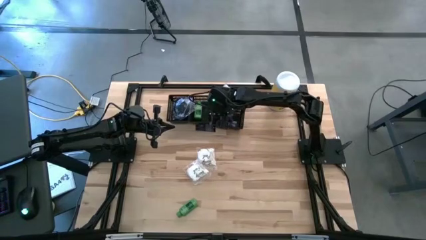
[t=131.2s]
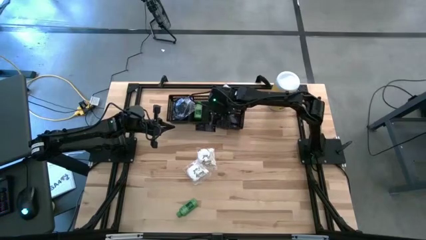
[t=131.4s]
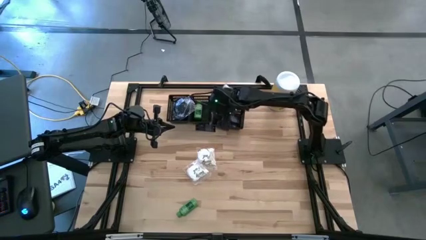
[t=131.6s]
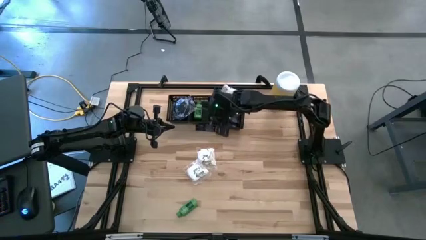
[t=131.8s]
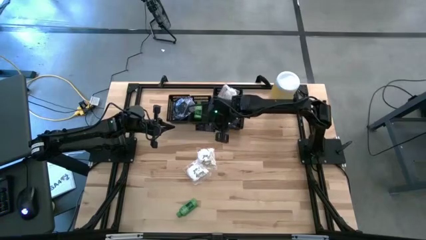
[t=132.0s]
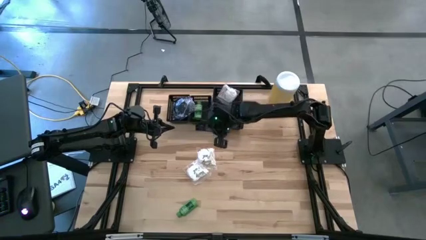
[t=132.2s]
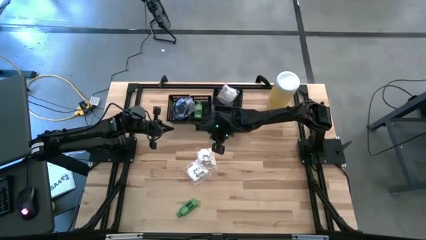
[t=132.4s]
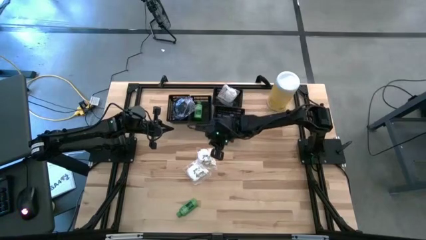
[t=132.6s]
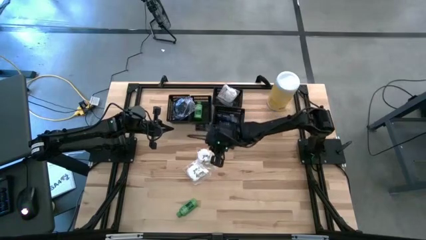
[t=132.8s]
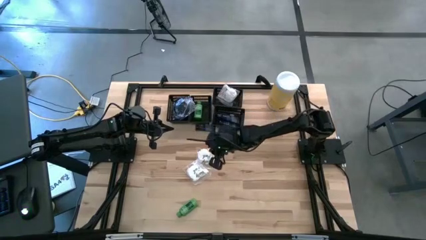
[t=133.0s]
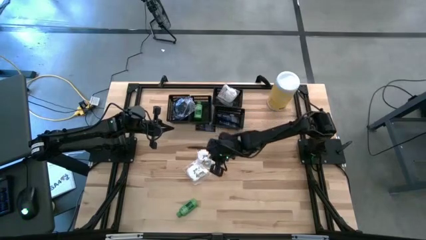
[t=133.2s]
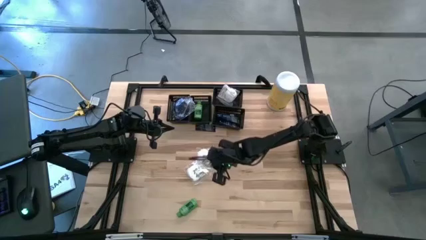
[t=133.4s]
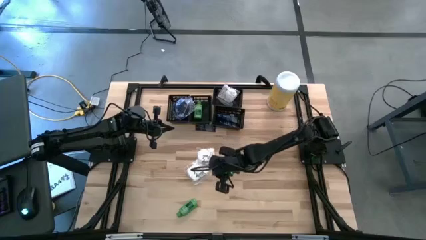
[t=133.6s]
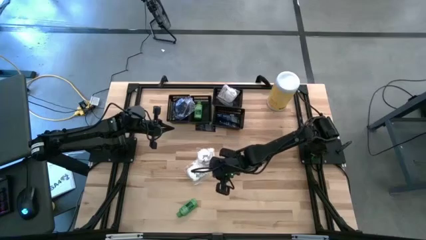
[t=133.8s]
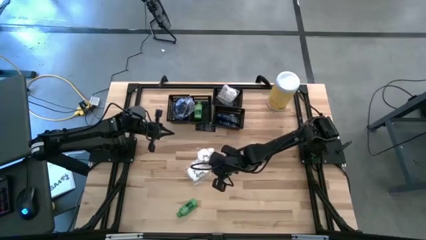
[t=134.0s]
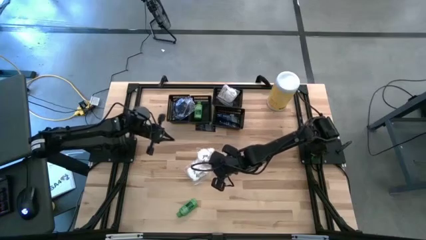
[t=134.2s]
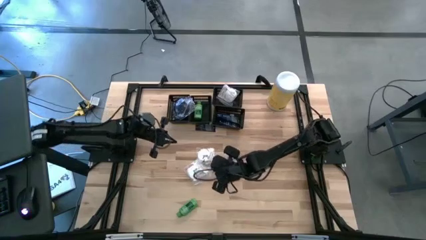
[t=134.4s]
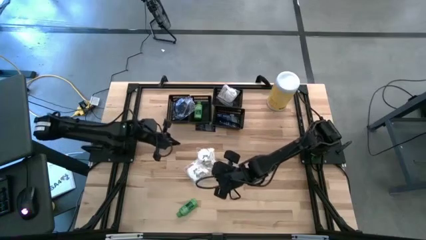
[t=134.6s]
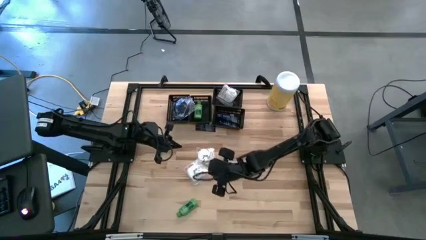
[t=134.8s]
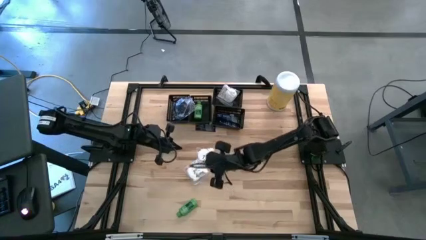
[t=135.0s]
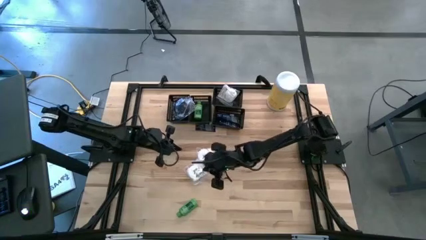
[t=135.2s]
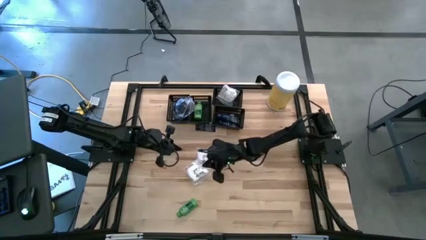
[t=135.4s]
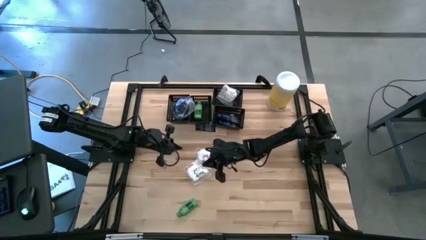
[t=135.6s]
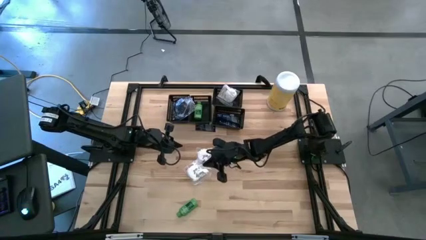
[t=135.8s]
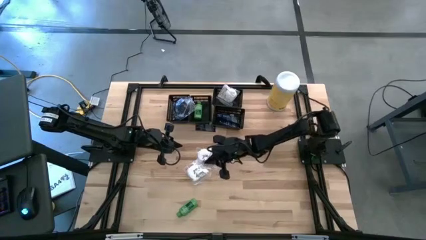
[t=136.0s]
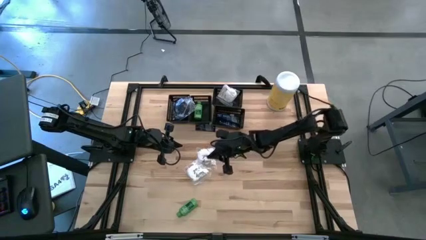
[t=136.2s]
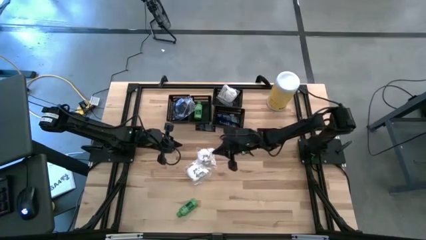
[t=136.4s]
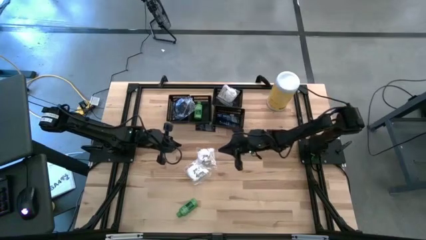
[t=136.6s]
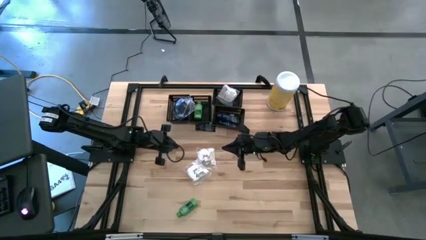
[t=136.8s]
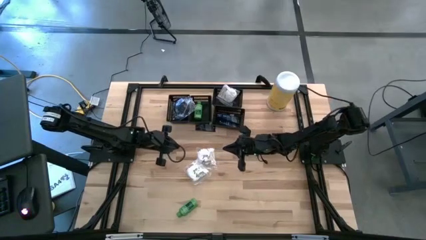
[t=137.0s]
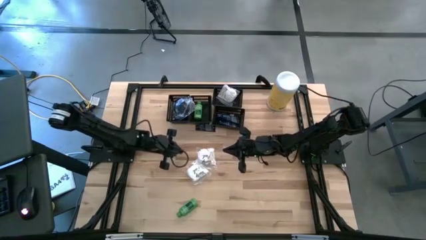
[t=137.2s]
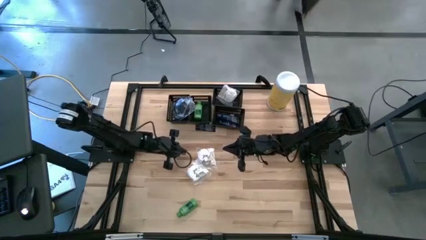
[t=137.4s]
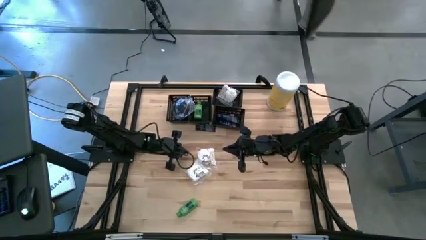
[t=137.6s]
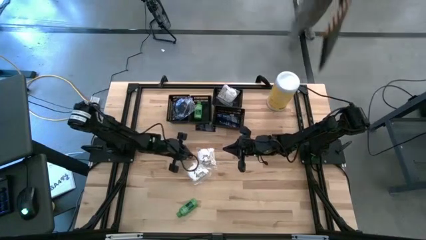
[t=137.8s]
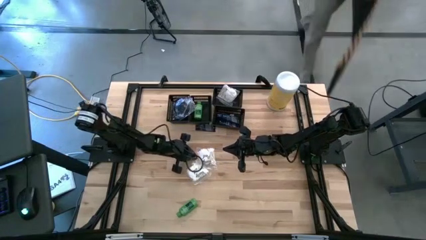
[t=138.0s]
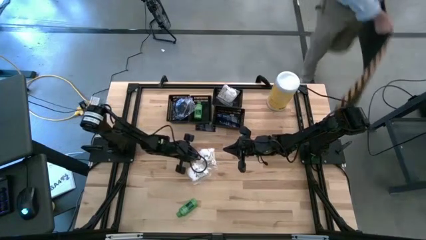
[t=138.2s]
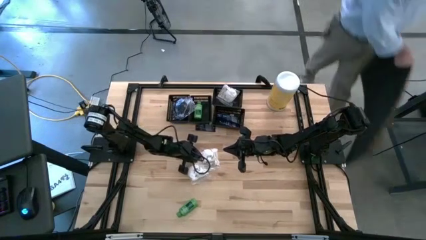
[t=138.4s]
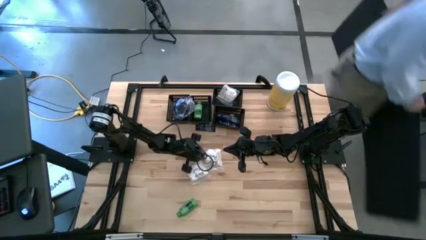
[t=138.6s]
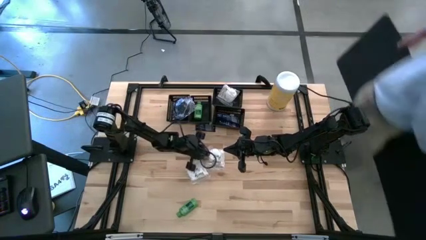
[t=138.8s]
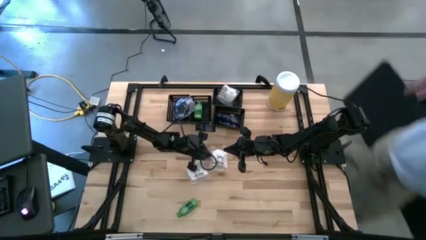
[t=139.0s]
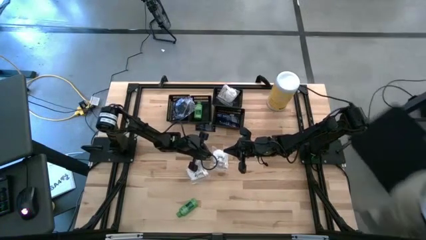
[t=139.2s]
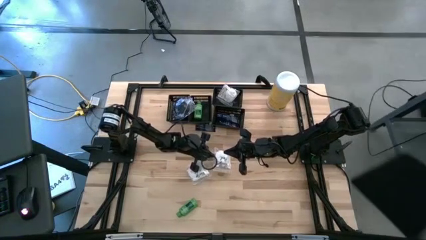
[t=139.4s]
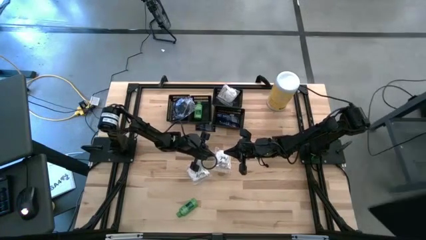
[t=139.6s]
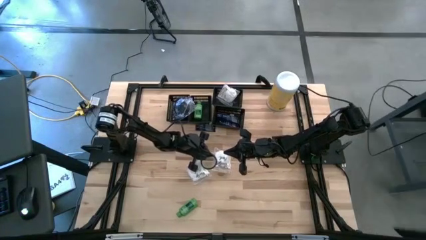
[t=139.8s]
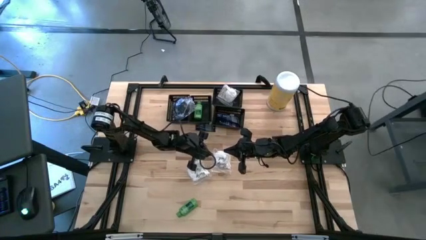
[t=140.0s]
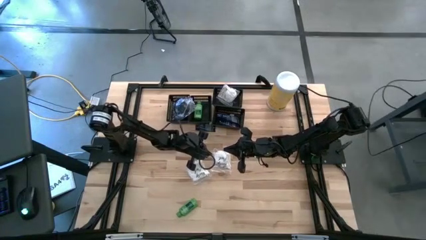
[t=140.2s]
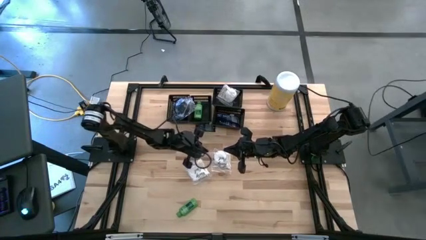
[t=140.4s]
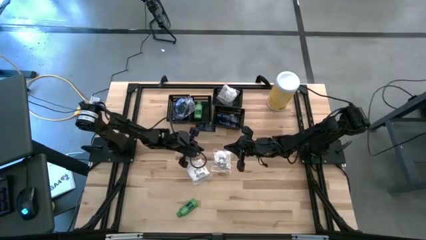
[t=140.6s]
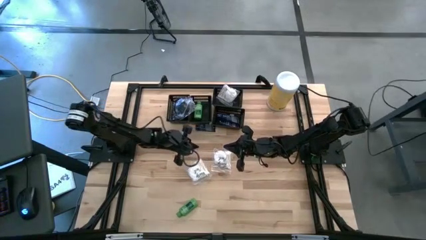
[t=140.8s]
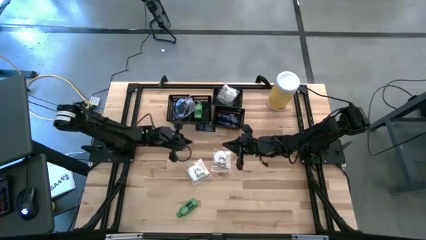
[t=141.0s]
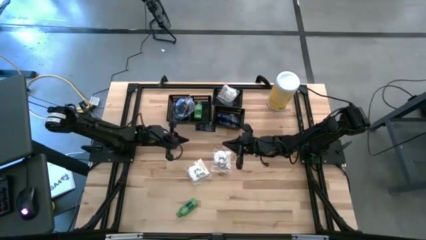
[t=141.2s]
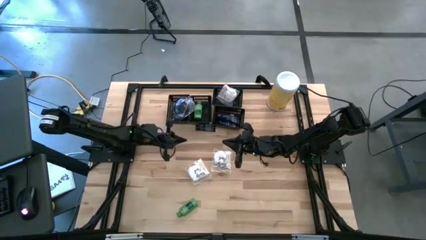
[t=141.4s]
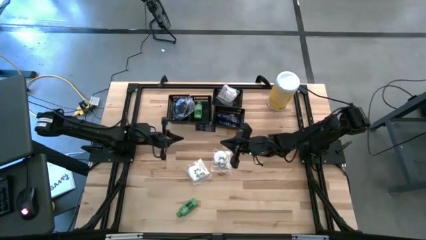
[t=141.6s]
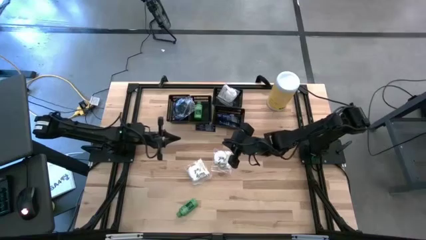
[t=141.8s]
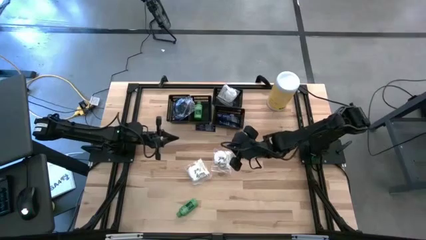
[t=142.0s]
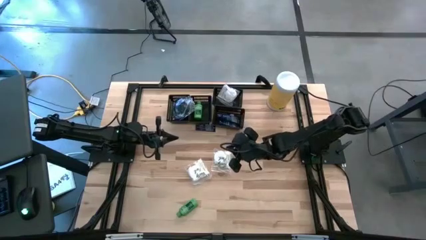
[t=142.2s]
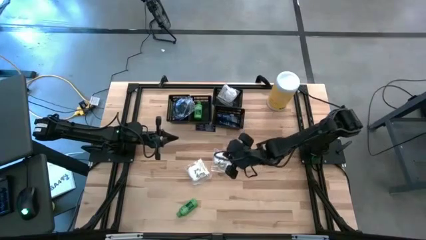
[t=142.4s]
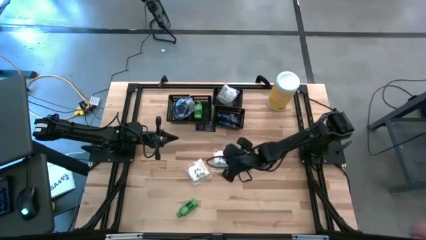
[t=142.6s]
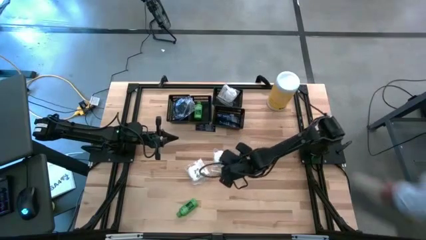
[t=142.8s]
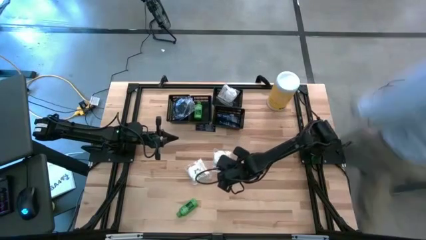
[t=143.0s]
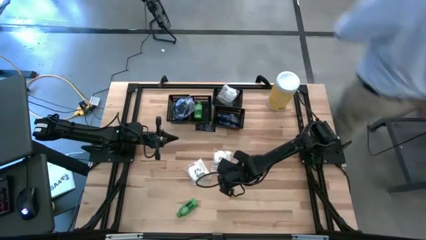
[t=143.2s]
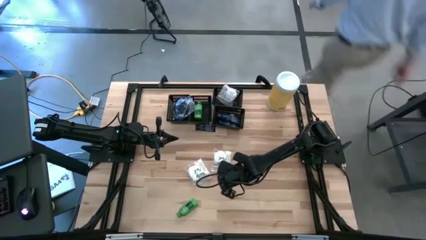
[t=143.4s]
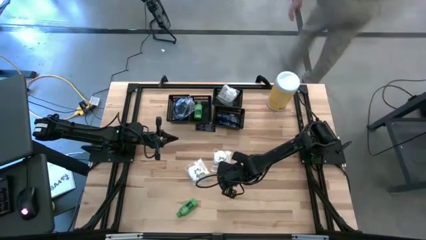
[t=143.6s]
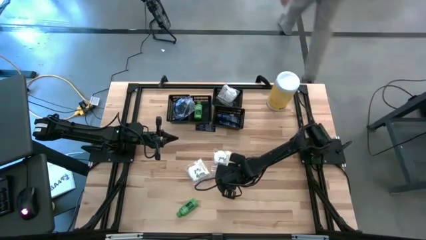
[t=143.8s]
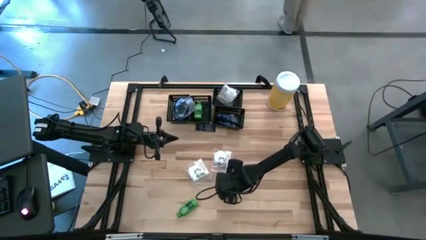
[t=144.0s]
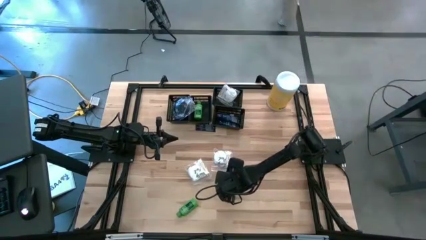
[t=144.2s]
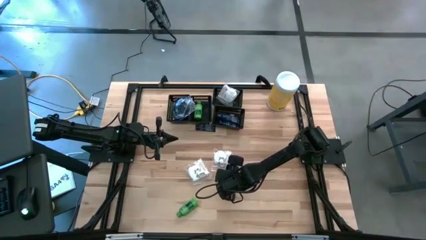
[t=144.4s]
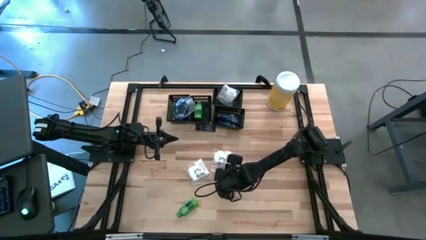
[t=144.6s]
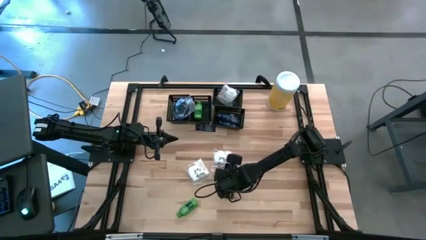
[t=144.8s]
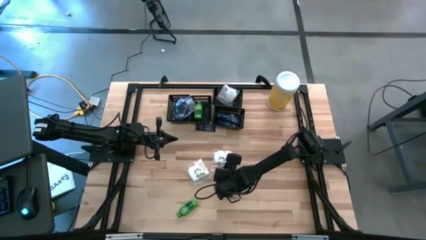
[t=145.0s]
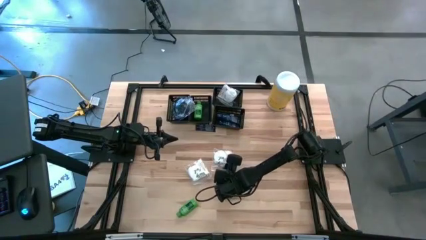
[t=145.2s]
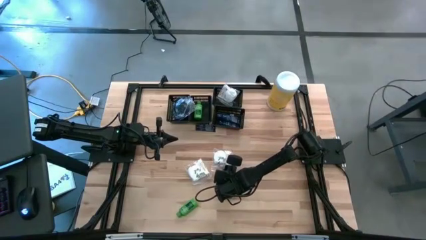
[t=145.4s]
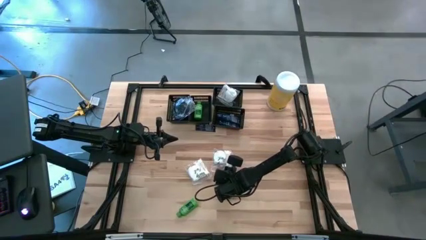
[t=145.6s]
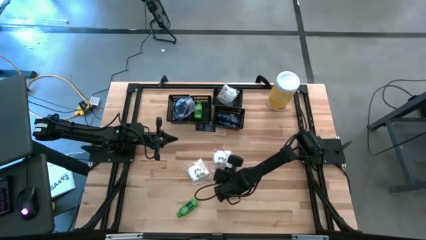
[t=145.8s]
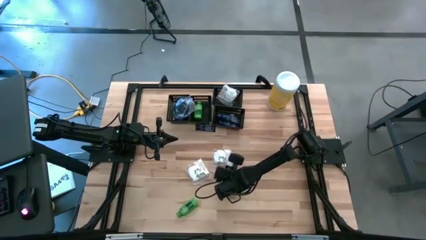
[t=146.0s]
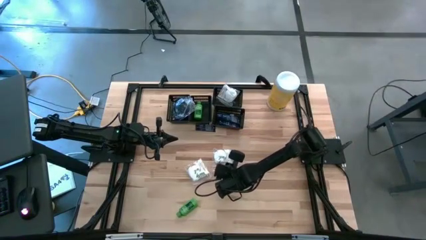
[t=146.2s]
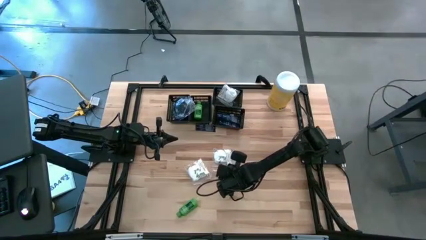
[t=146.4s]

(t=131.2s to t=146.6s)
Task: Pick & Place Travel size toiletries
Put the white middle cotton buds into the top black bin
